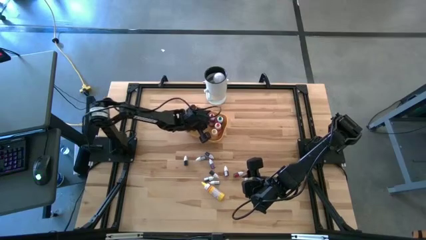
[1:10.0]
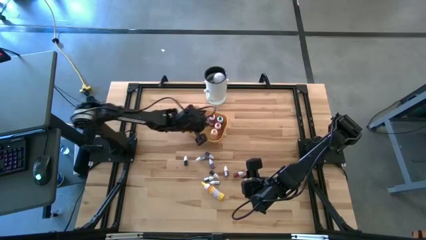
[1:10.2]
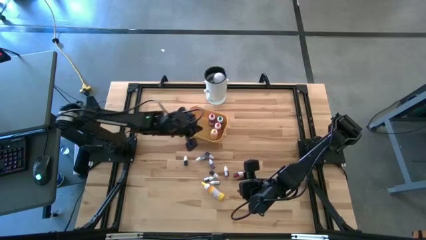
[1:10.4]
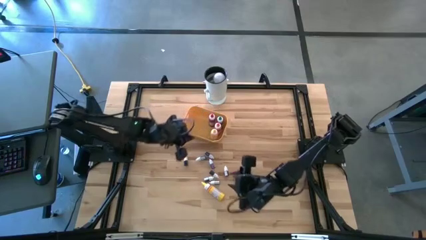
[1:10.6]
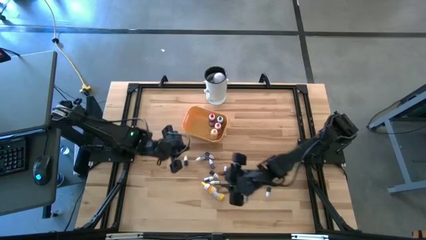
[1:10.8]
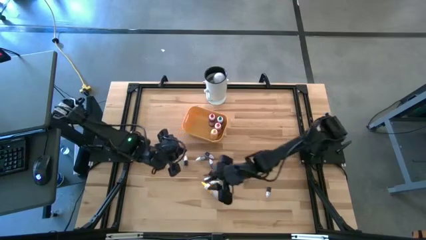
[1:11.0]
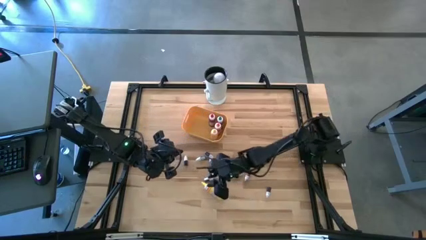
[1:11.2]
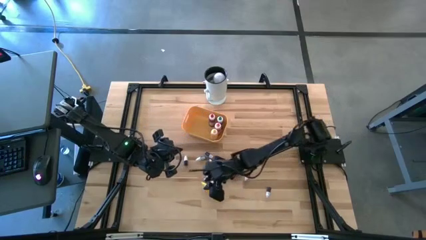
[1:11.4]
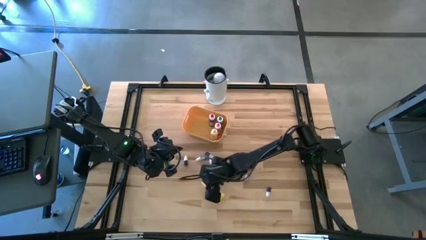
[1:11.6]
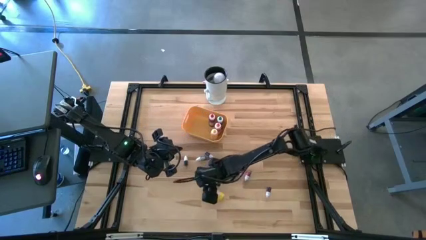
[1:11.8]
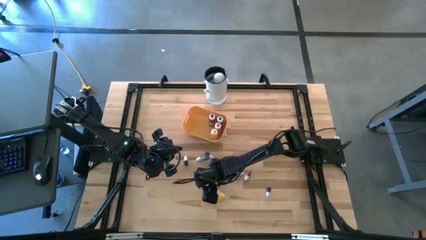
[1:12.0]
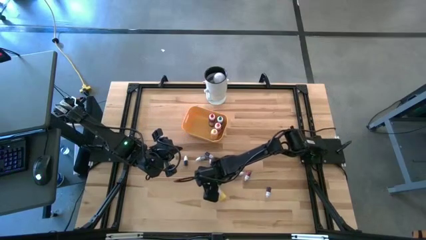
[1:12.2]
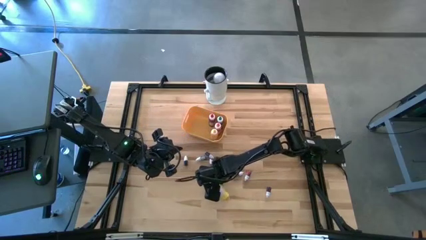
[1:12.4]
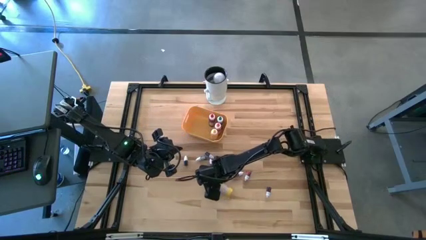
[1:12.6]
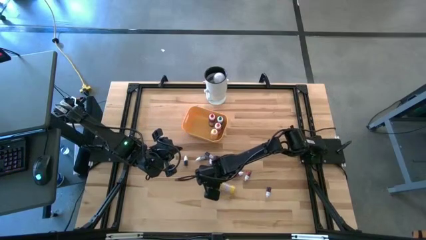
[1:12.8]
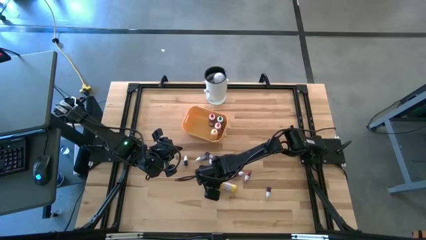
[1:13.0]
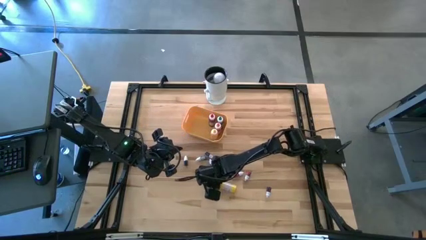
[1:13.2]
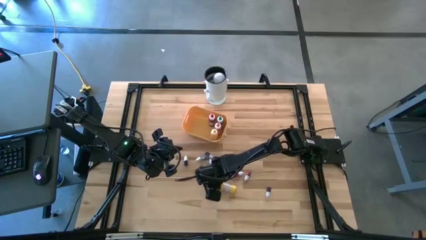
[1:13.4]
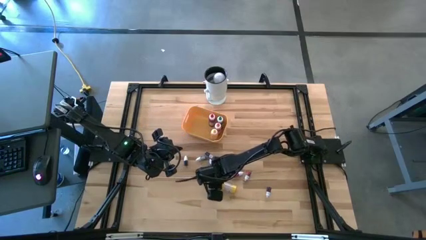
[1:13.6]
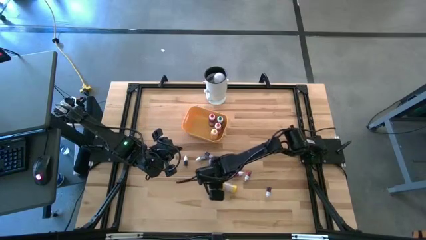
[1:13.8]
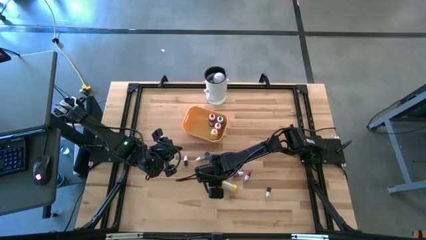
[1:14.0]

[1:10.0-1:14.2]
Task: Pick & Place food coloring
Put the large yellow food coloring bottle into the yellow bin

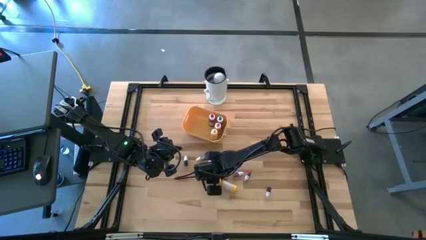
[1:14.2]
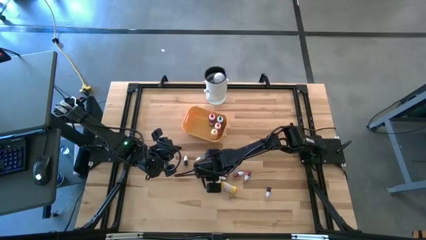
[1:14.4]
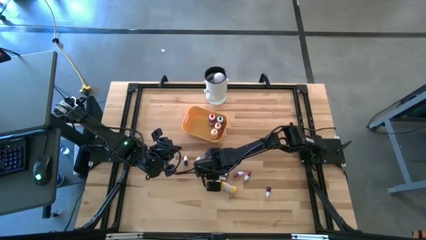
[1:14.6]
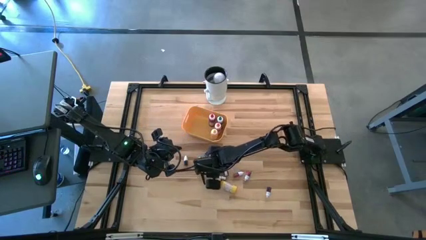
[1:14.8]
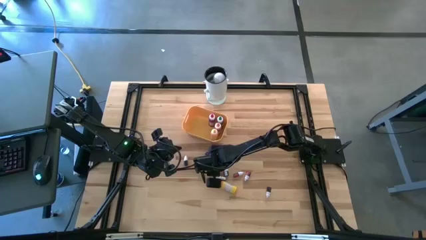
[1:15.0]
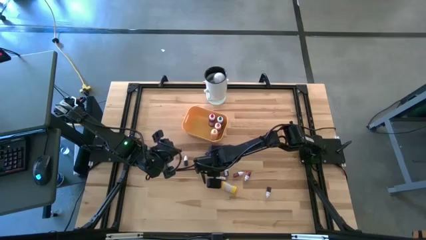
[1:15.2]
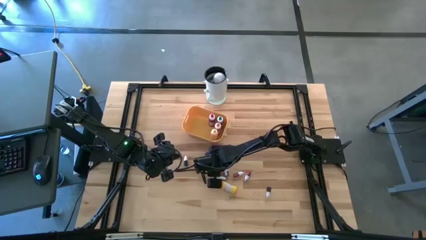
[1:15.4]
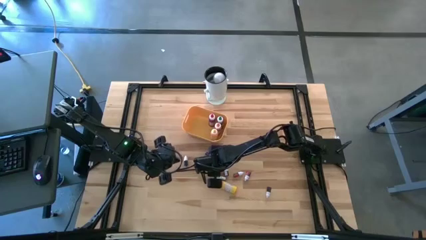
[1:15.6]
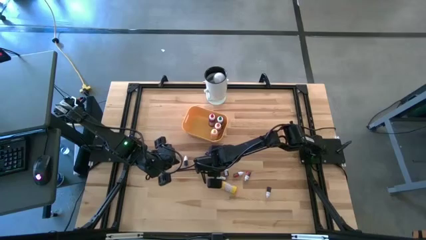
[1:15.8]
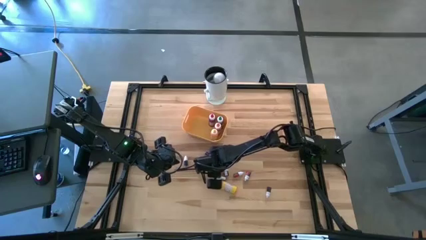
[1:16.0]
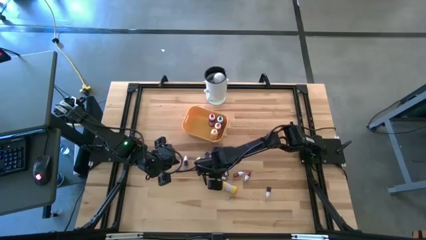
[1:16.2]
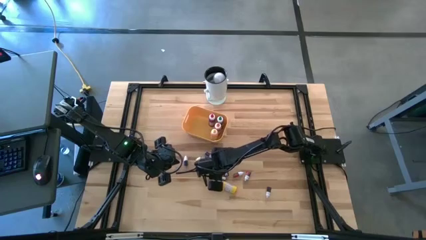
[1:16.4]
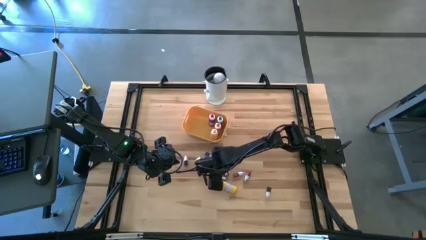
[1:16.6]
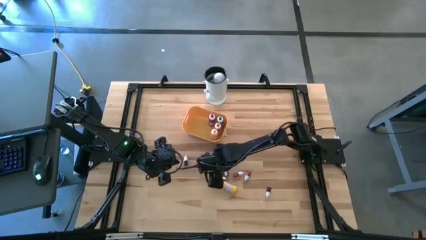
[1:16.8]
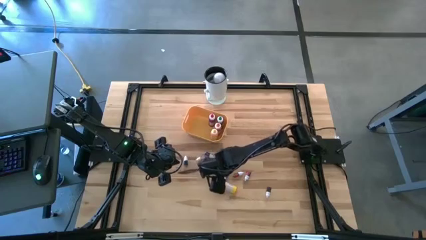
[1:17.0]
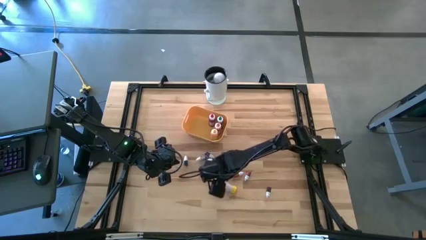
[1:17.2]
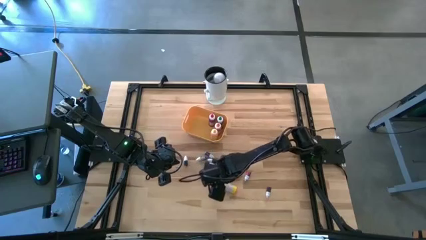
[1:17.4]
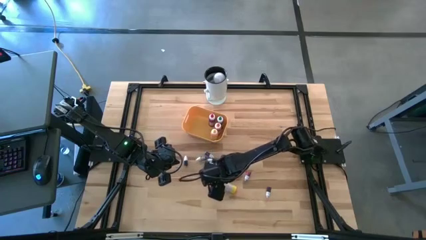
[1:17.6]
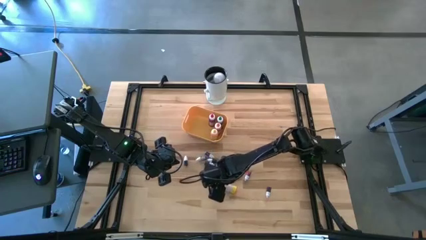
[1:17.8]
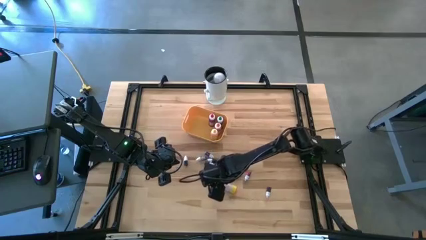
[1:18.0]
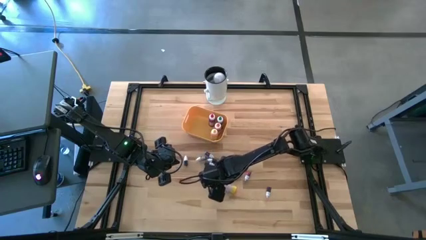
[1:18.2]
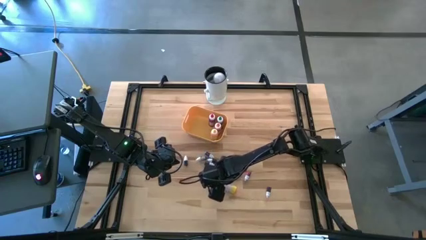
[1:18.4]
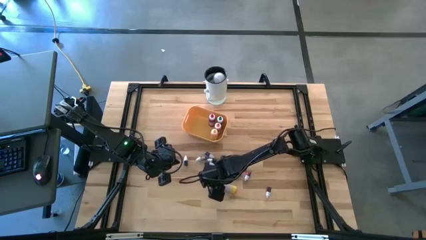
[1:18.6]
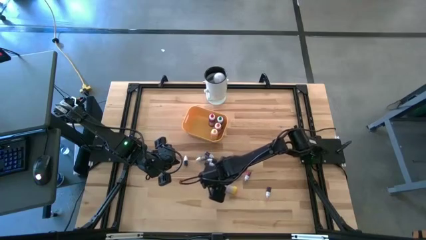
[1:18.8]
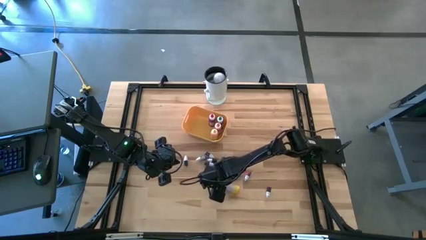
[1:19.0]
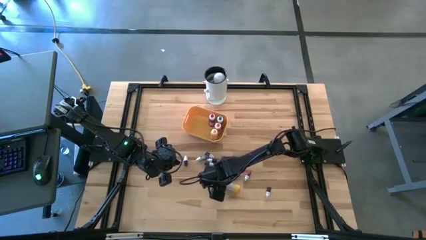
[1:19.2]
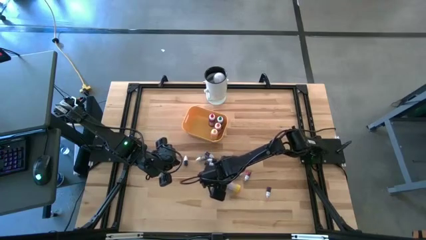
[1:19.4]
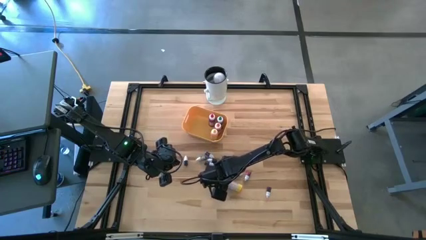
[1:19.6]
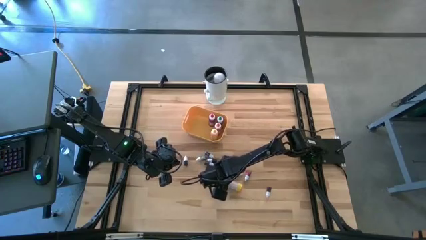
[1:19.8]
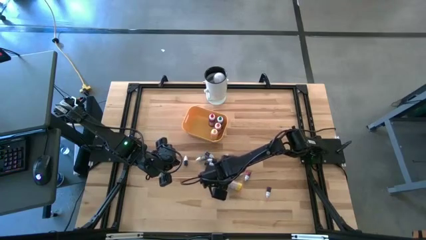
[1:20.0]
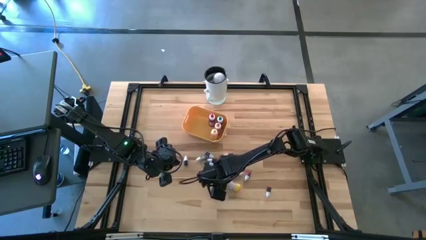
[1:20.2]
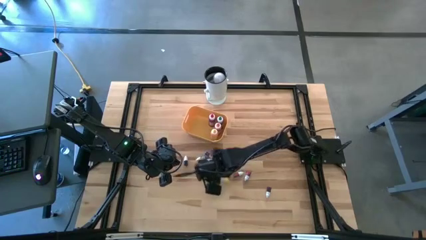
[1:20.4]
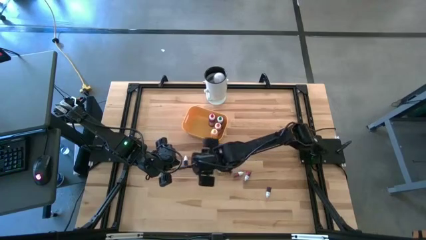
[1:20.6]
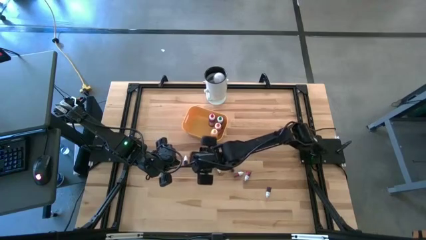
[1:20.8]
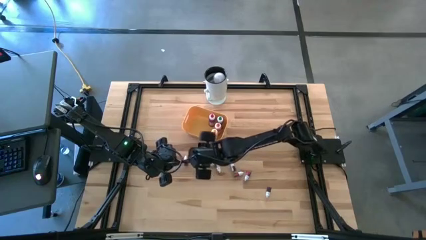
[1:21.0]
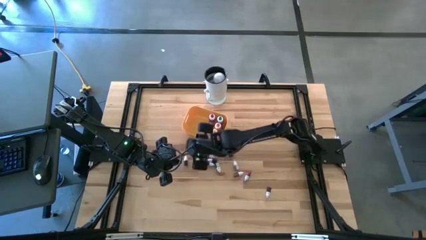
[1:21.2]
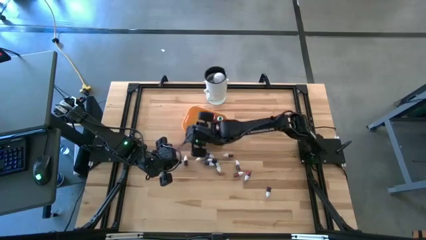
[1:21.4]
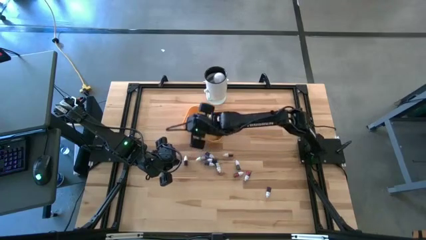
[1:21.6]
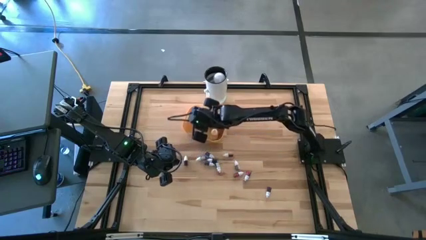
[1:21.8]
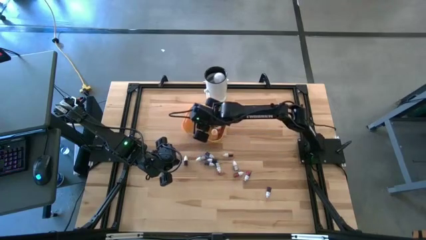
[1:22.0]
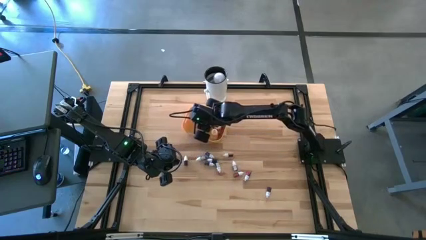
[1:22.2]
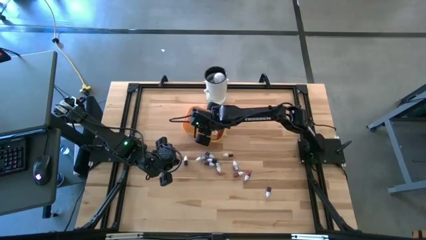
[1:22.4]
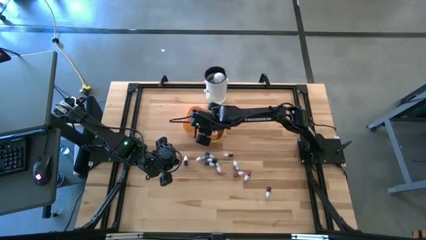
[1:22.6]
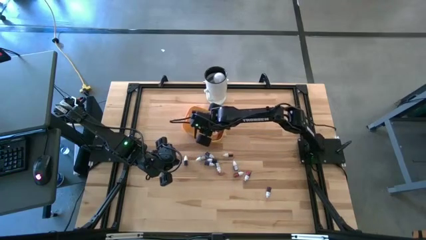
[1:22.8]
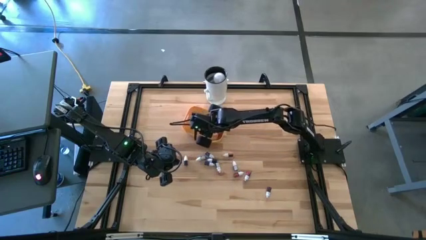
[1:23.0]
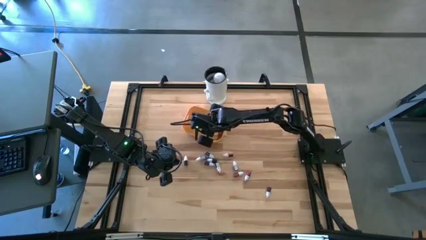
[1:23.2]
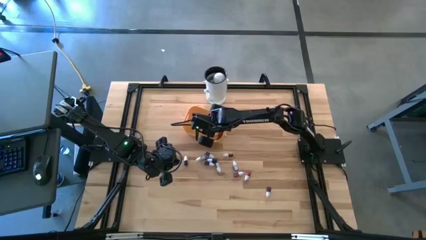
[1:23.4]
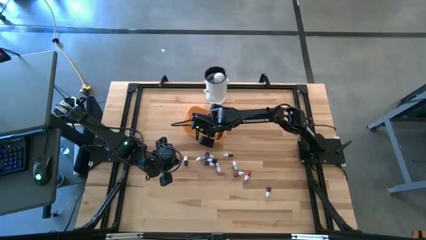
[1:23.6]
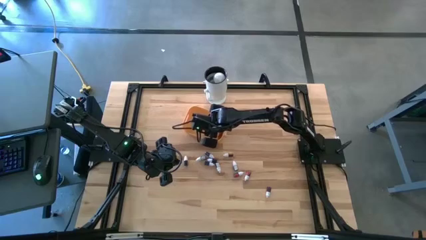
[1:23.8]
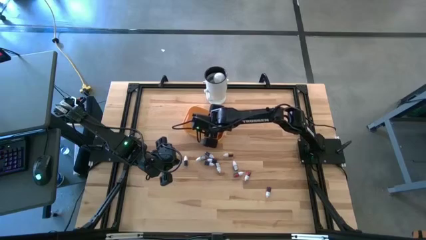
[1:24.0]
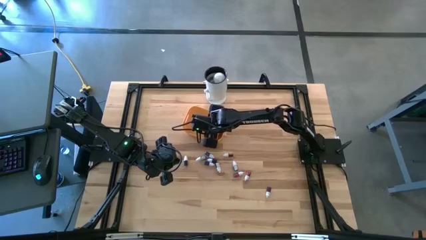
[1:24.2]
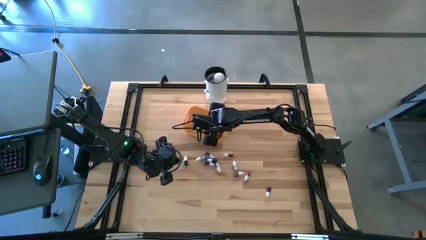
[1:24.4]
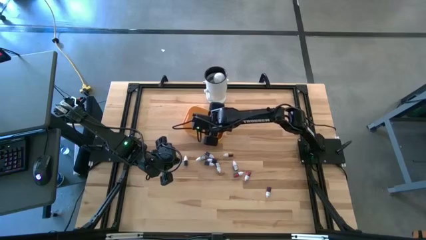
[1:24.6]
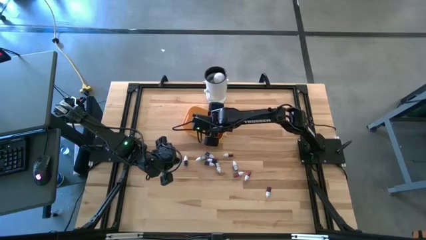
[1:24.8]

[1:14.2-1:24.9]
Put the large yellow food coloring bottle into the yellow bin
